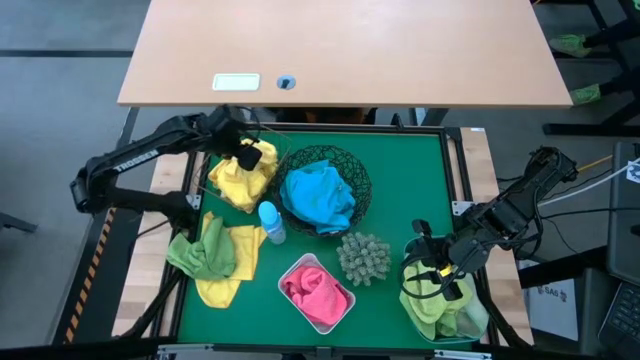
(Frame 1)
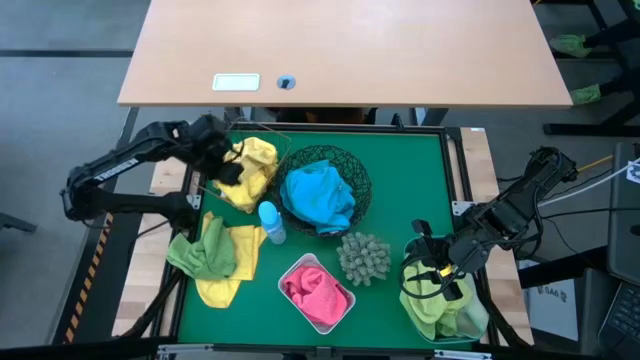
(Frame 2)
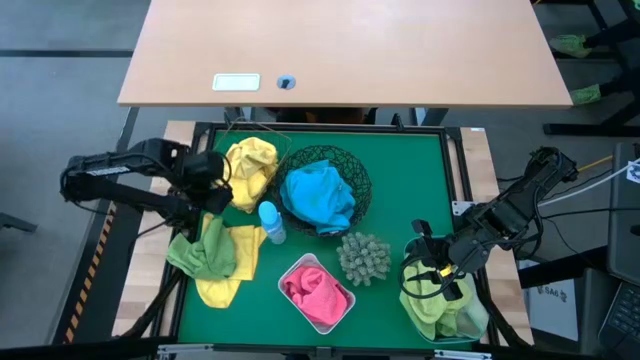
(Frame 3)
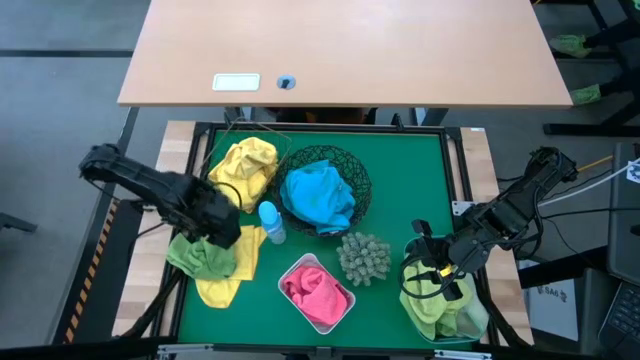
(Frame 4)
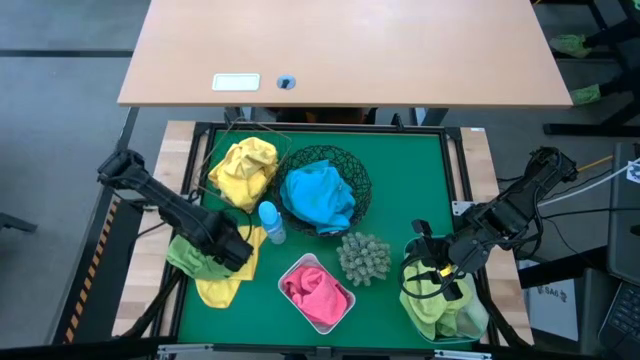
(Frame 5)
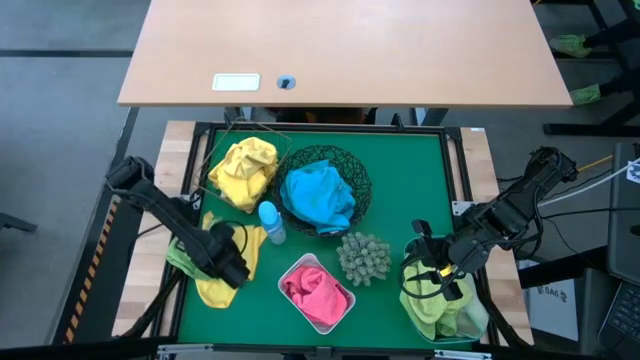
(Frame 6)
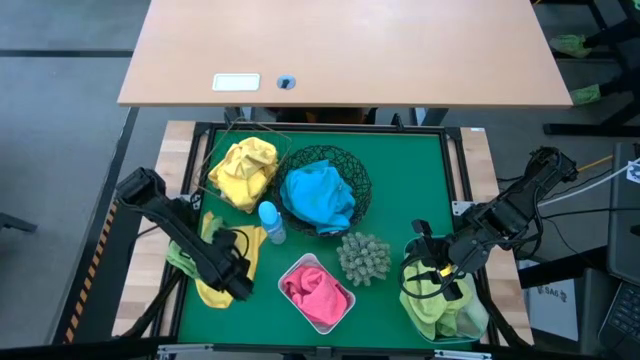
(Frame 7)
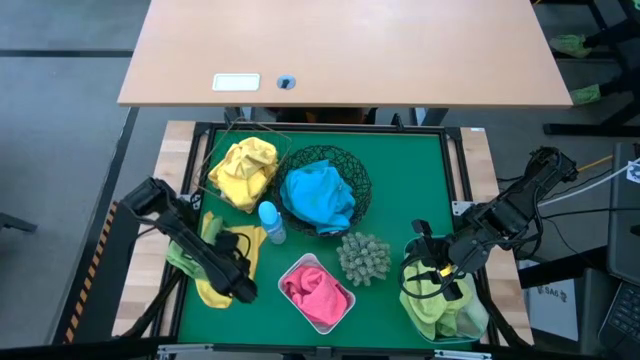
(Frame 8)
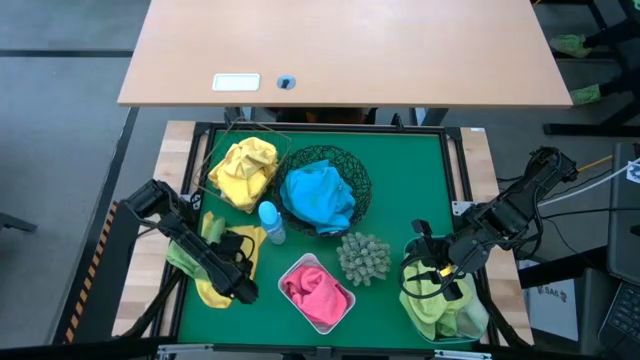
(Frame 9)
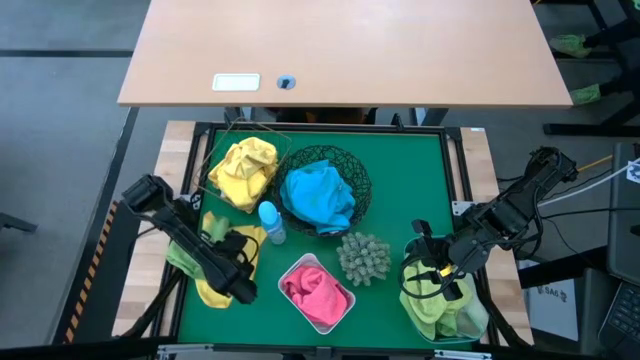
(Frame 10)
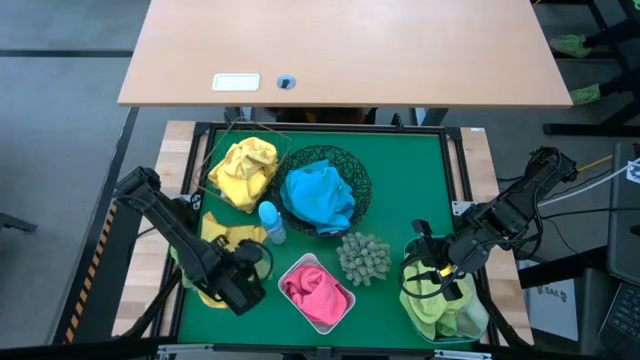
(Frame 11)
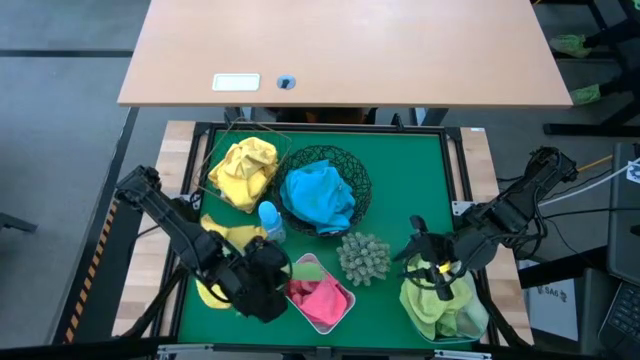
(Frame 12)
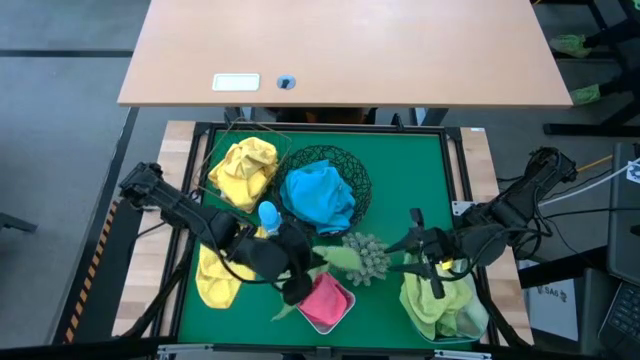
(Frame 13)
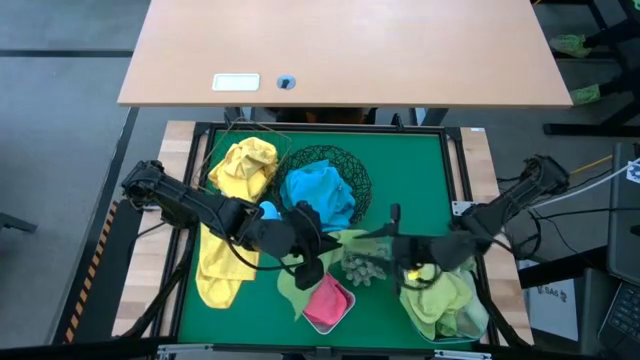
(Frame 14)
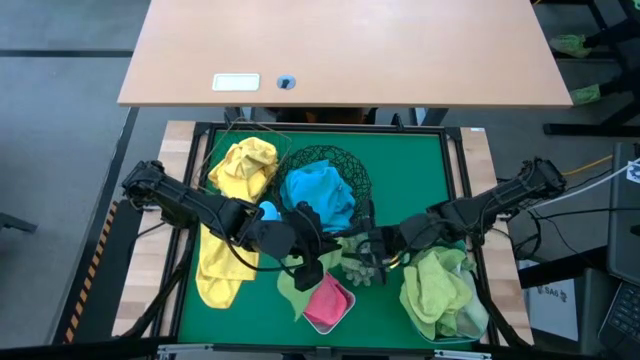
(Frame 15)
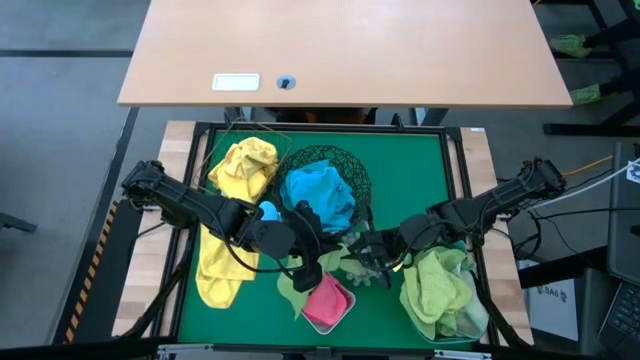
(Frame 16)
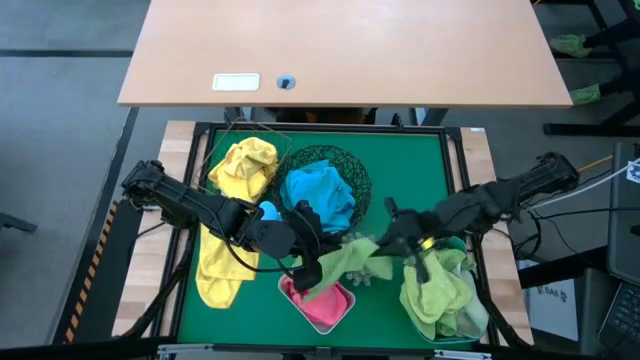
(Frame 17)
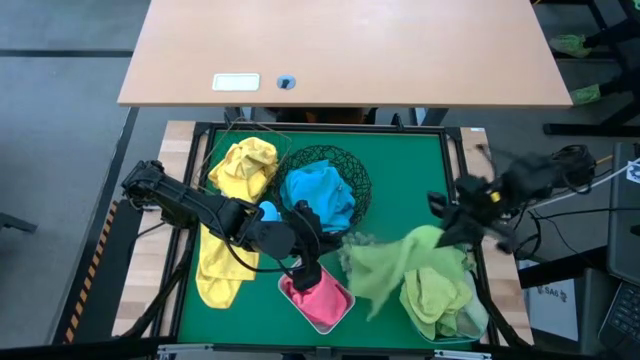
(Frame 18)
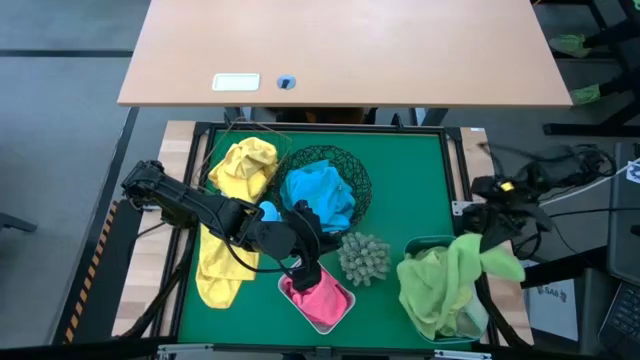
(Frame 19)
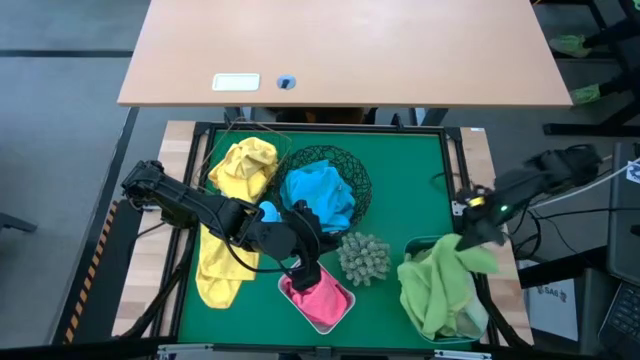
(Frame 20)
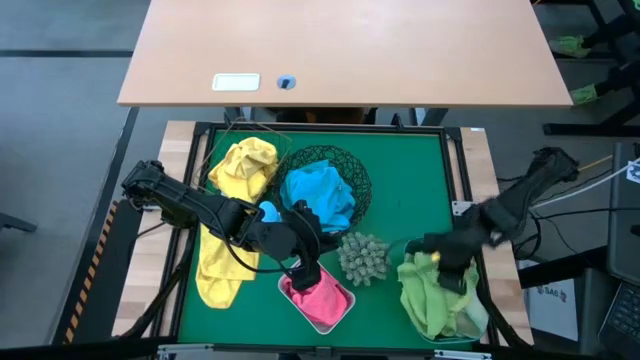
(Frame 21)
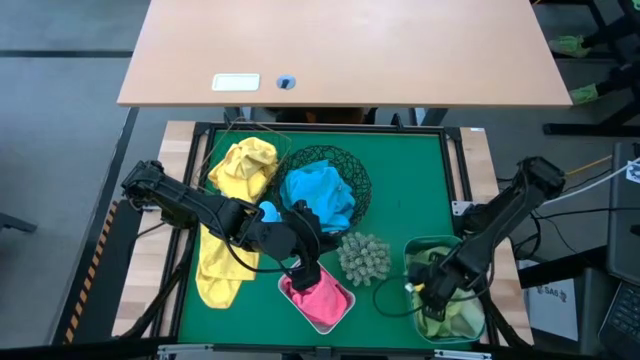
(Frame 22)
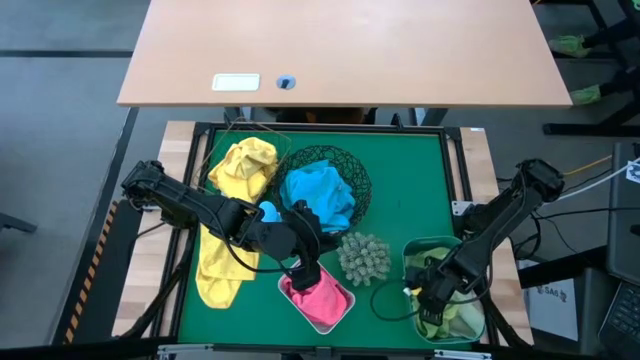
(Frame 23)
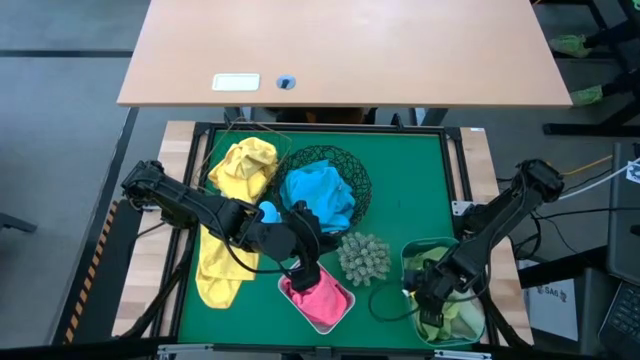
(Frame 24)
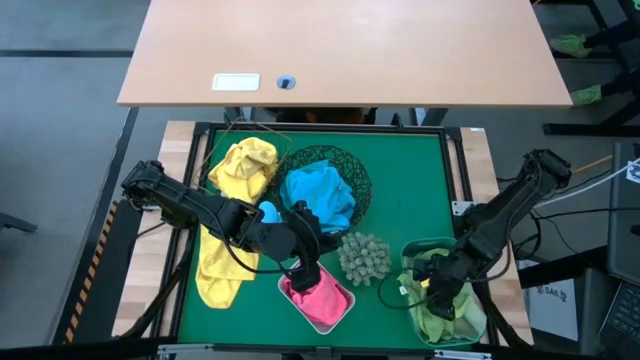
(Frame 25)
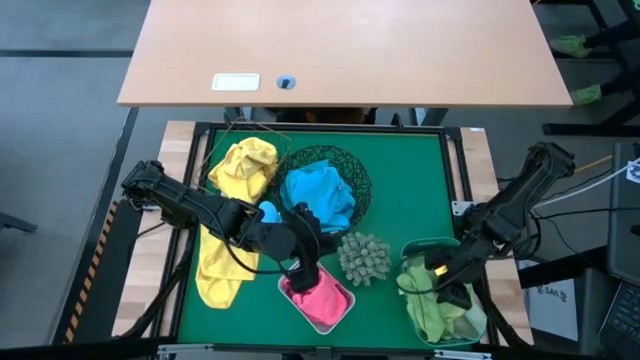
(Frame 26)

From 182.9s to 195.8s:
Task: Sort microfiber towel by color & place in baskets
Put the green microfiber cloth into the blue bin

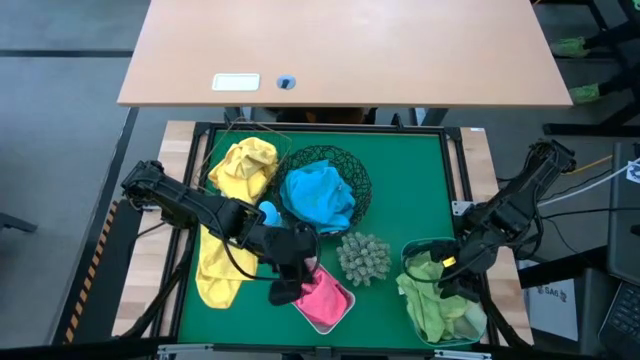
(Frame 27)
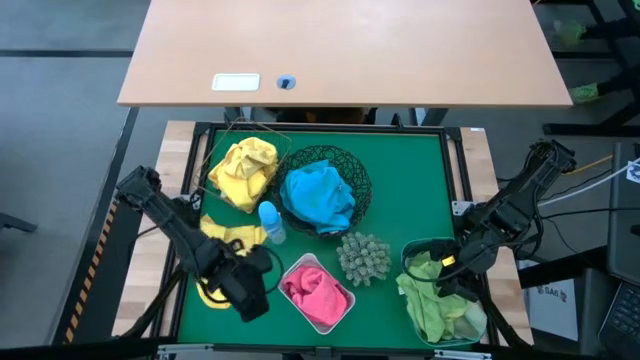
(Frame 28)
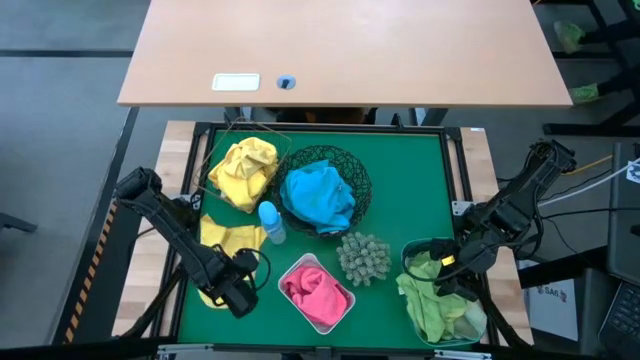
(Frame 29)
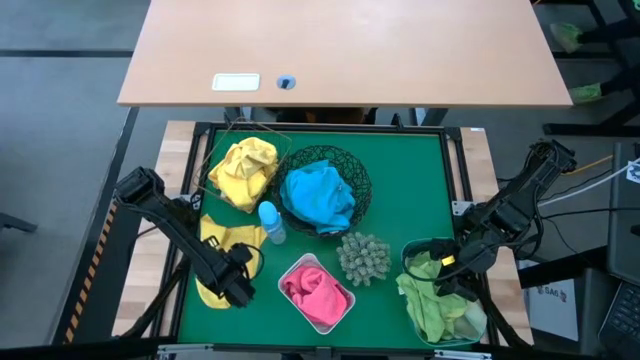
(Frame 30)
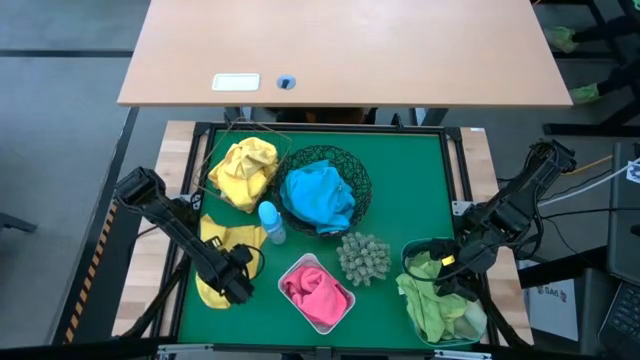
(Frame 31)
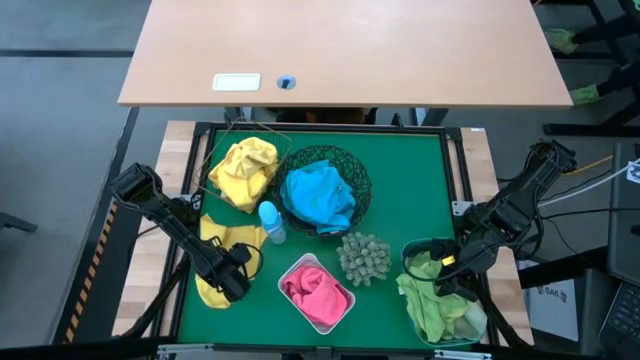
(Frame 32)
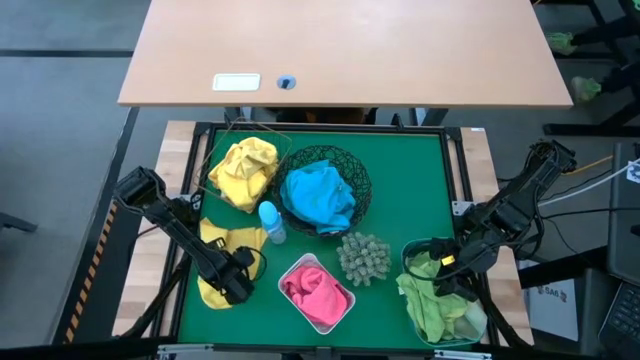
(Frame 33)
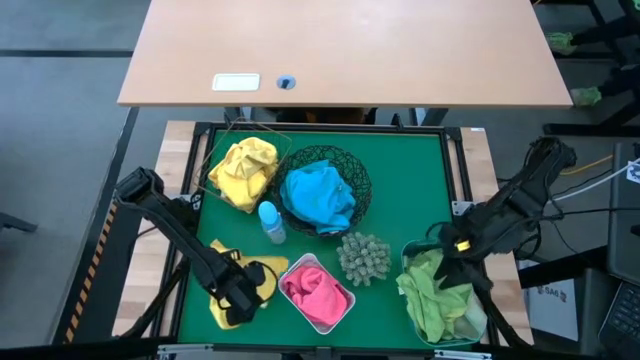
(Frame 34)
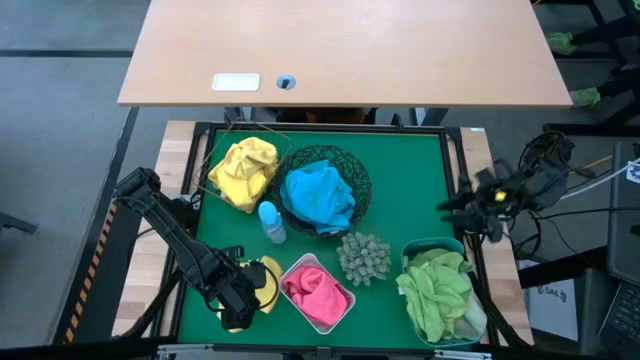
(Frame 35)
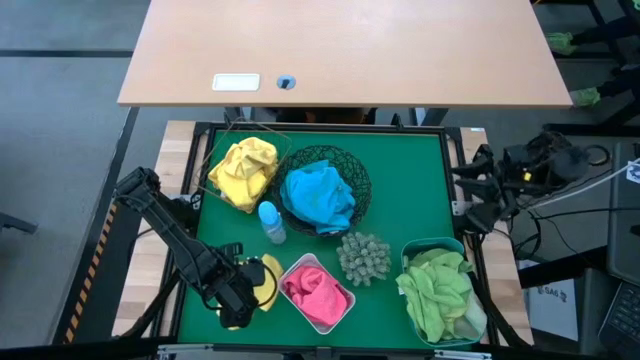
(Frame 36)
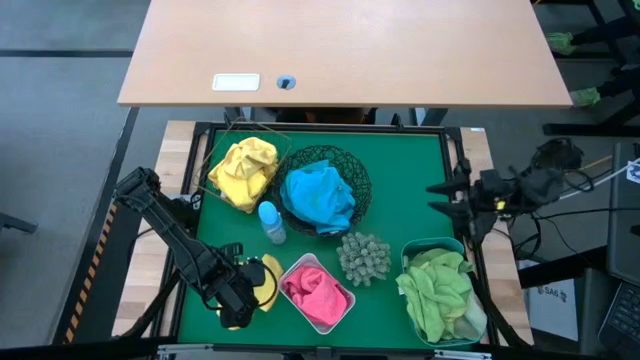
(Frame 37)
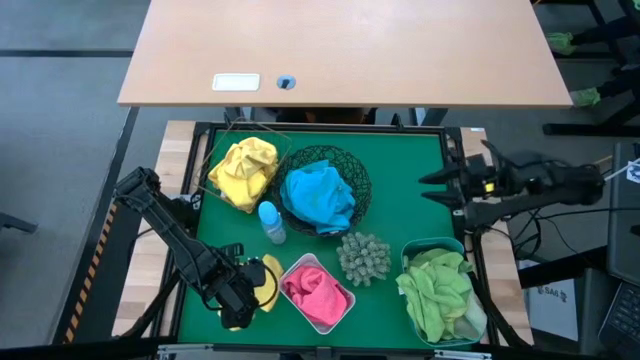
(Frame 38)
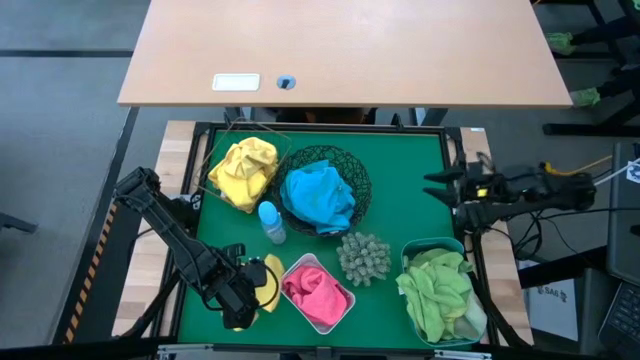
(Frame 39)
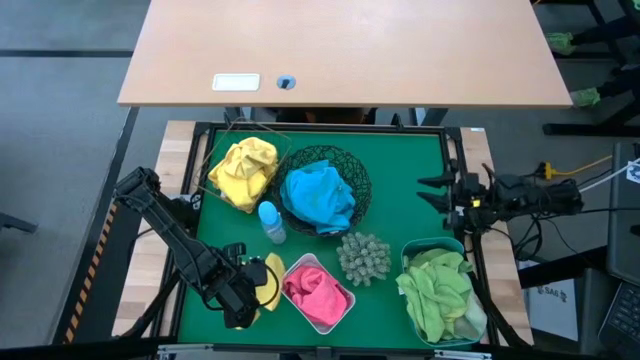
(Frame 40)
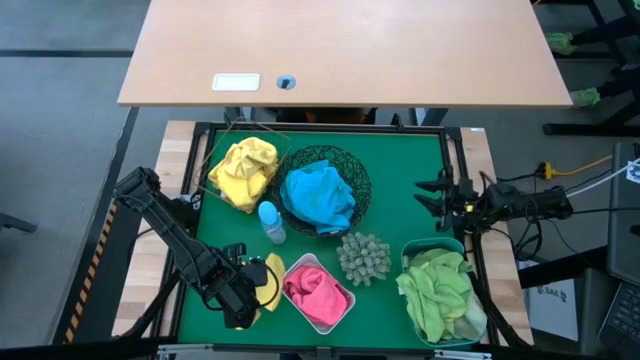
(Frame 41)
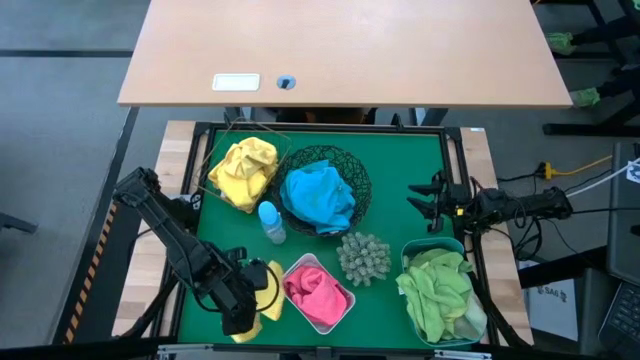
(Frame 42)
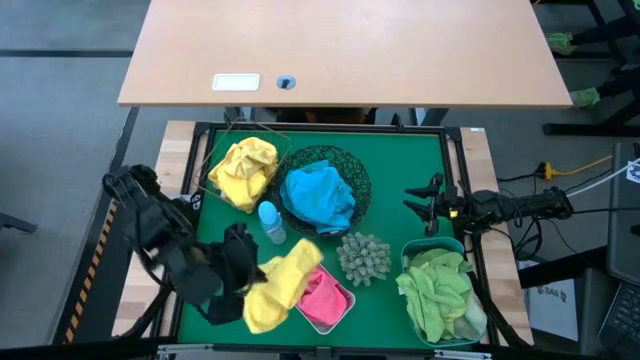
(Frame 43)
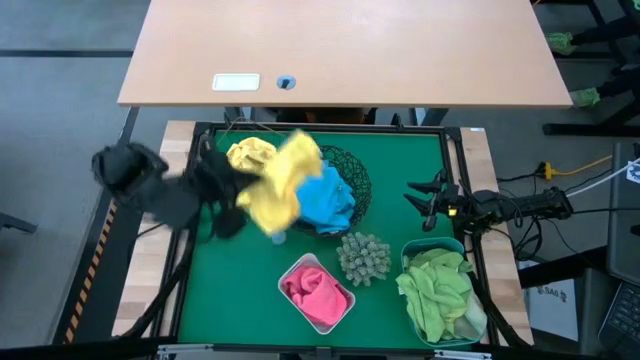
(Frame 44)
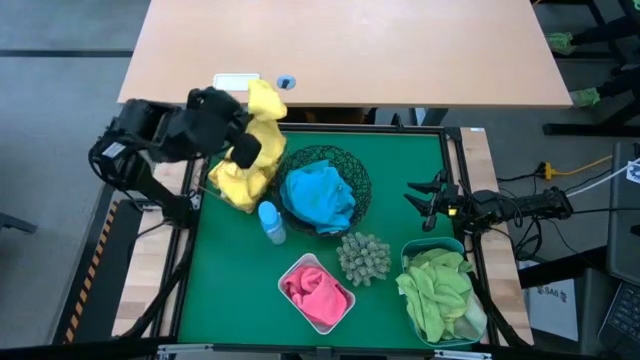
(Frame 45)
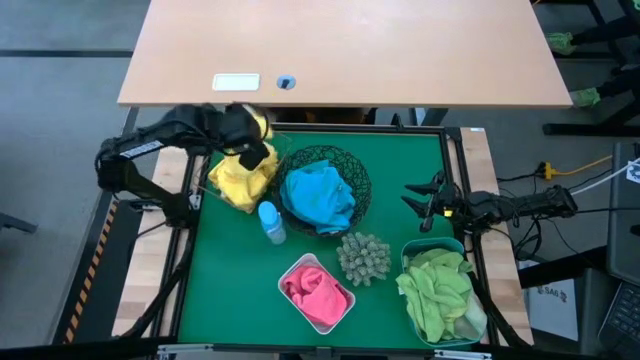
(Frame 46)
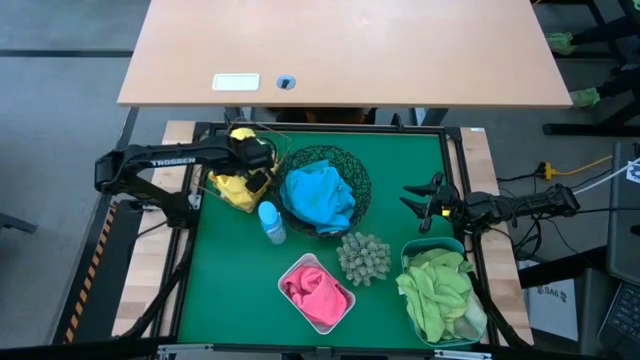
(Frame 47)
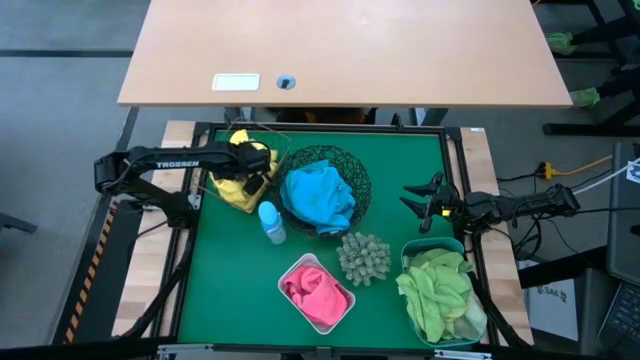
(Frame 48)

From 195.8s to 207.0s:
Put the yellow microfiber cloth into the rectangular wire basket
